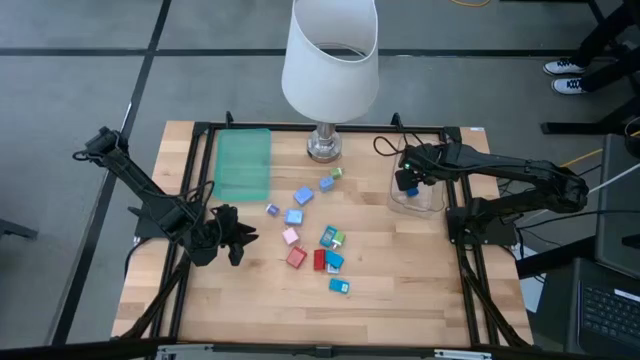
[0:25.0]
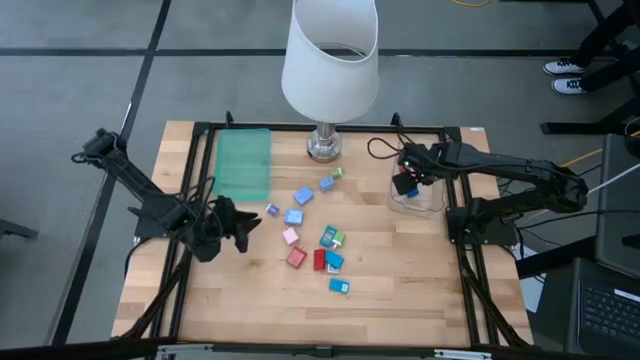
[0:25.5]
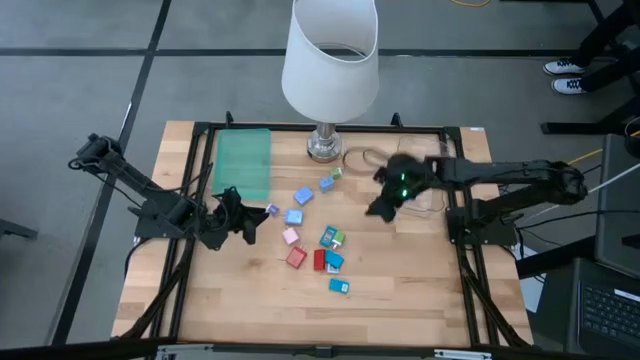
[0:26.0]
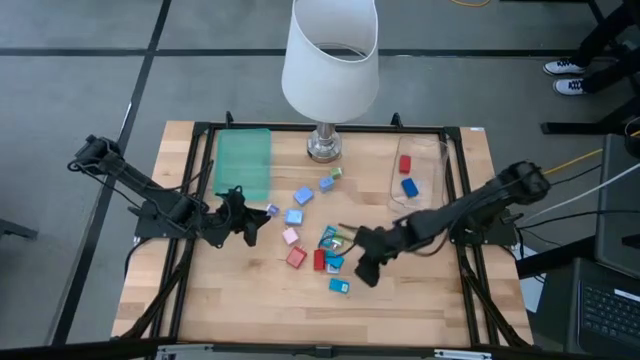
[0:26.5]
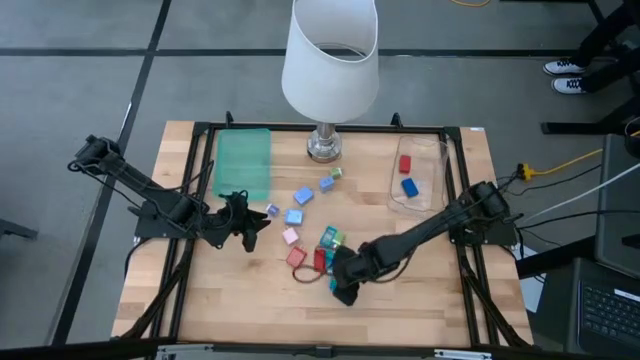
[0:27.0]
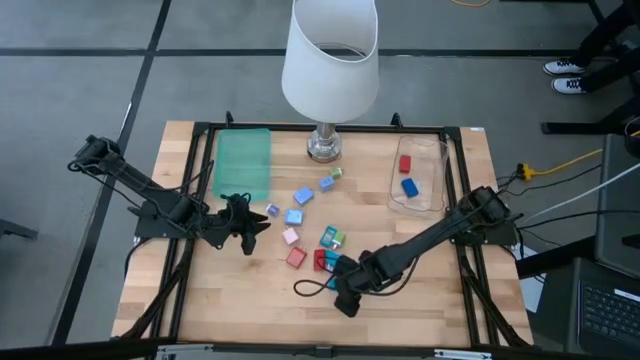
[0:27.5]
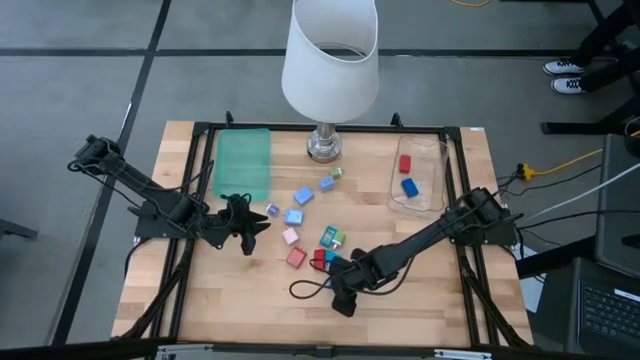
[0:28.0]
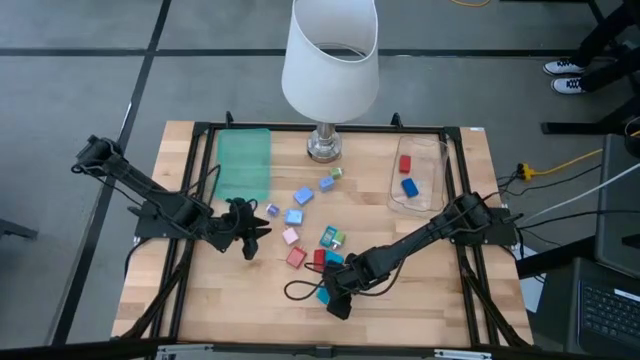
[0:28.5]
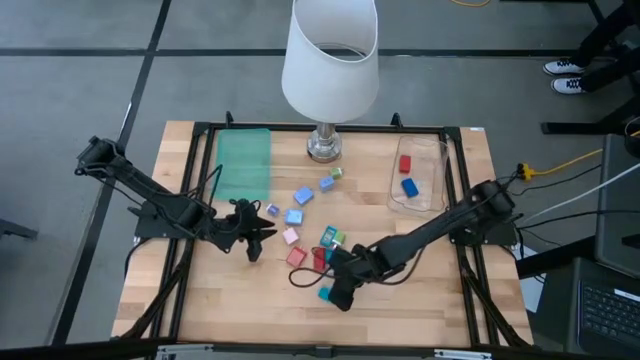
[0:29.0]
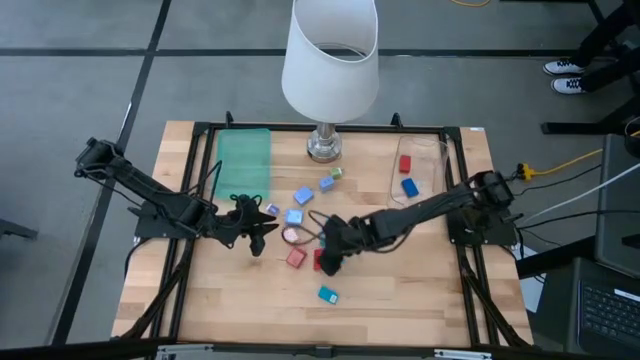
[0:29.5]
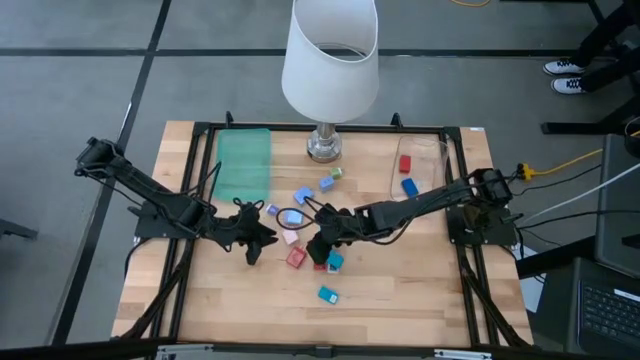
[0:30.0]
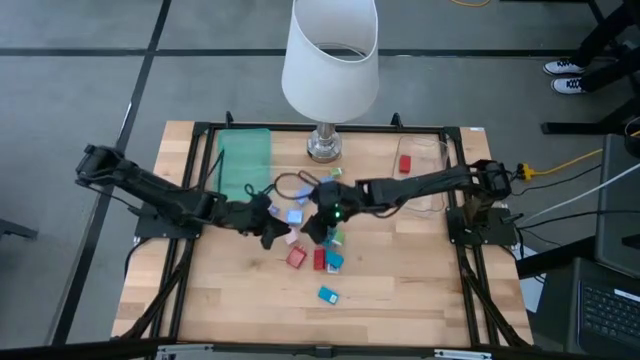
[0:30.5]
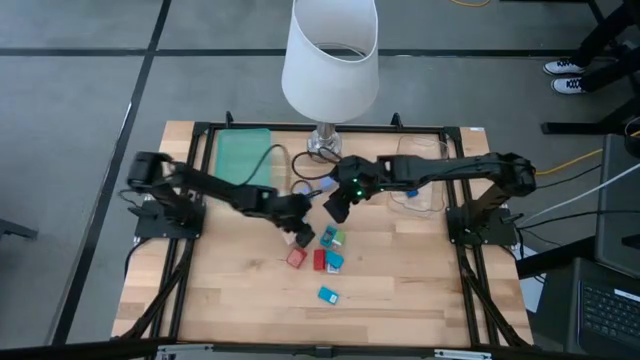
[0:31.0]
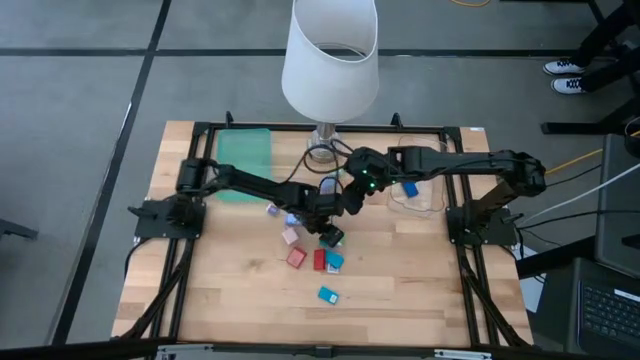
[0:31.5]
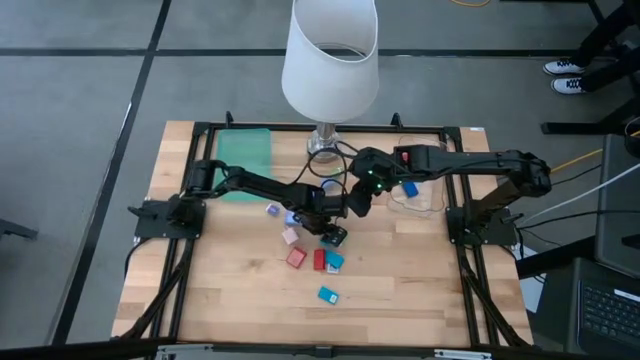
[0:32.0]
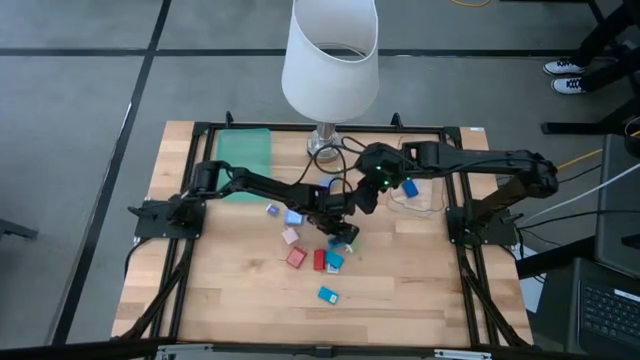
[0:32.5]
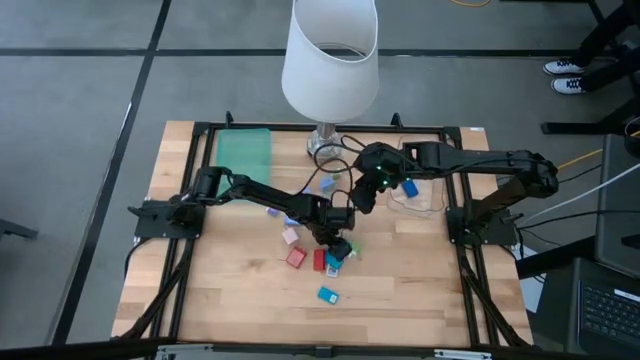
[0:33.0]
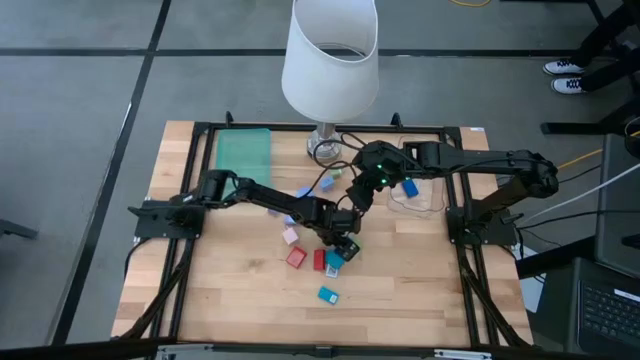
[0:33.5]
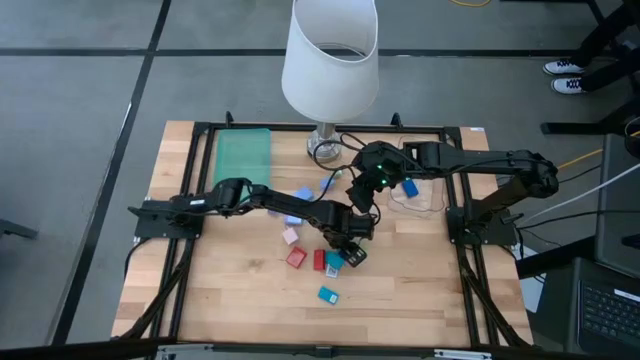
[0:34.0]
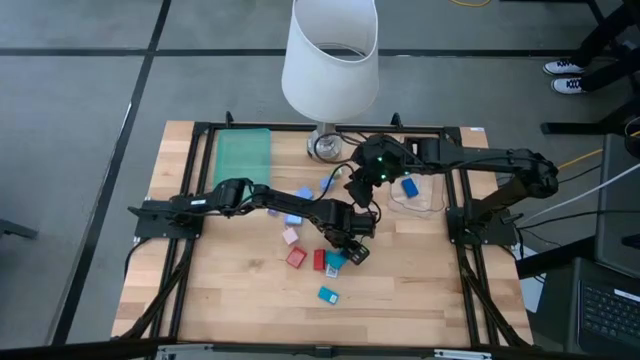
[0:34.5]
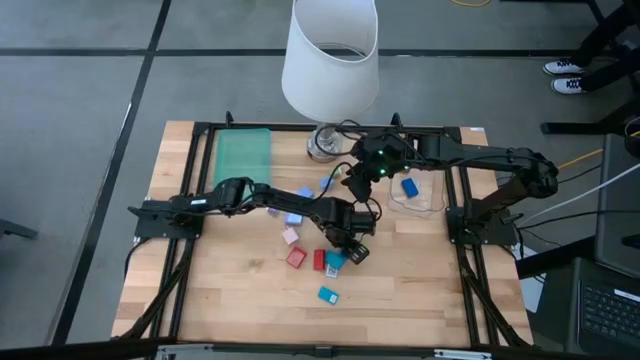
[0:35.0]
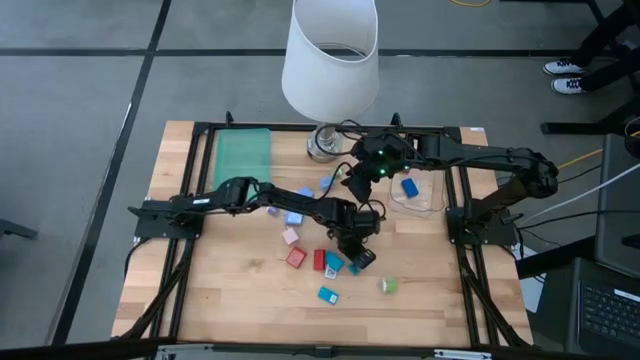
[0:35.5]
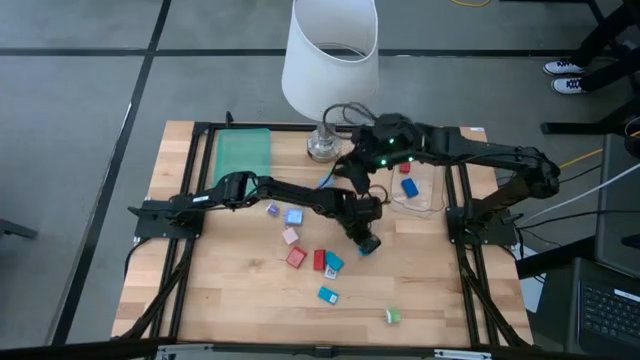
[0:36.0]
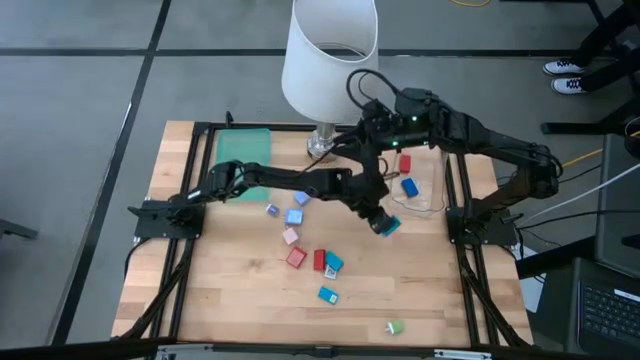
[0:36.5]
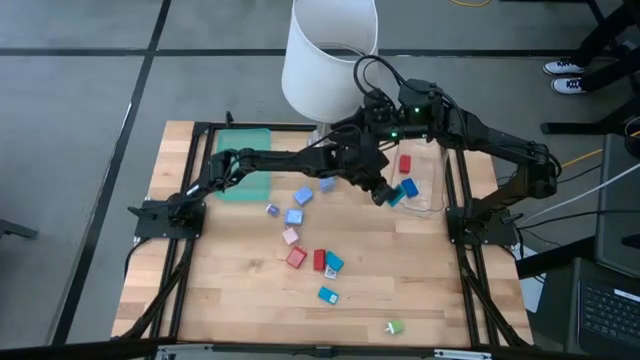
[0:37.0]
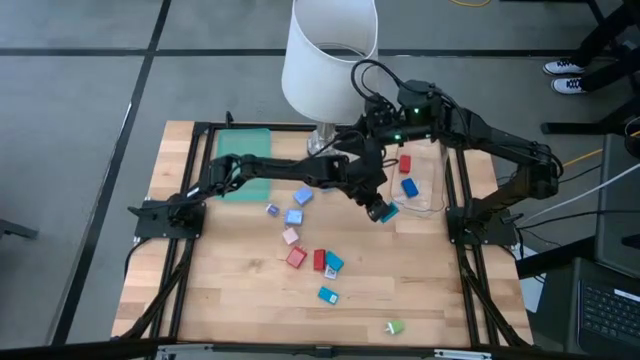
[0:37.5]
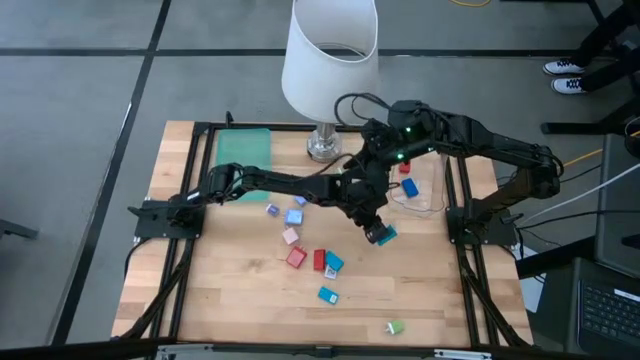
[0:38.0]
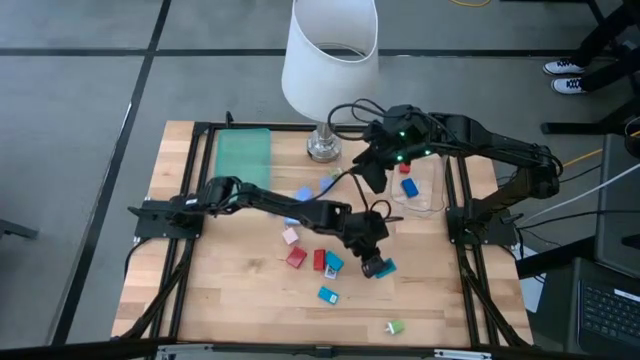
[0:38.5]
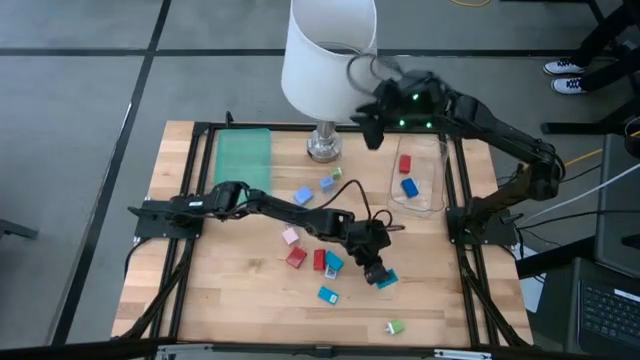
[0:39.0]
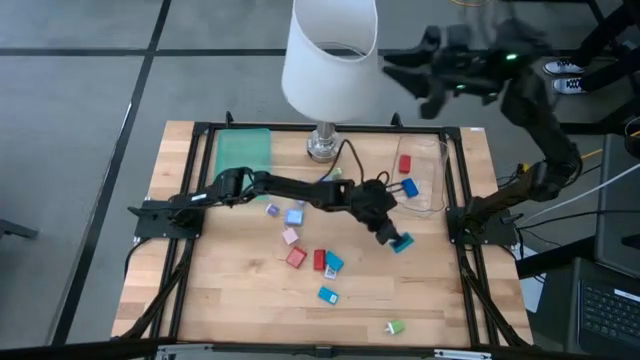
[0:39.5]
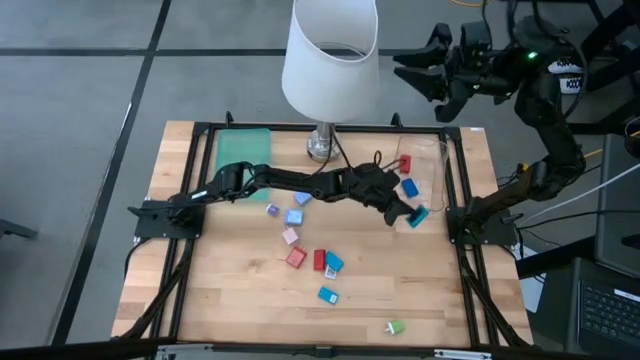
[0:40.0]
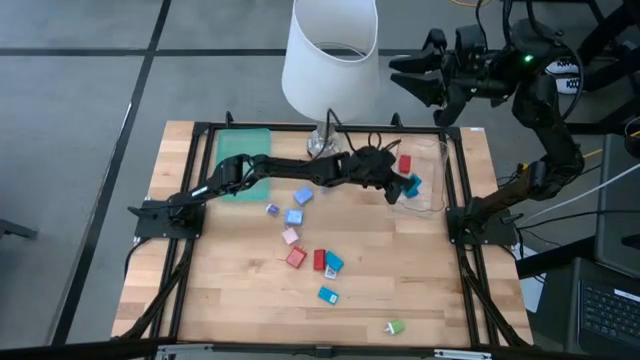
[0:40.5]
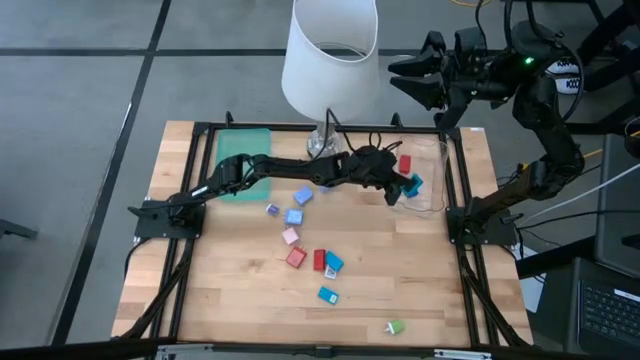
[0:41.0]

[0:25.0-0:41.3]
Task: Pick & Place Office items
Put the light blue digital timer into the transparent bin

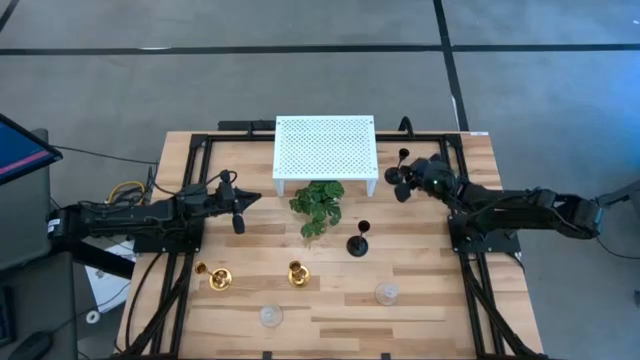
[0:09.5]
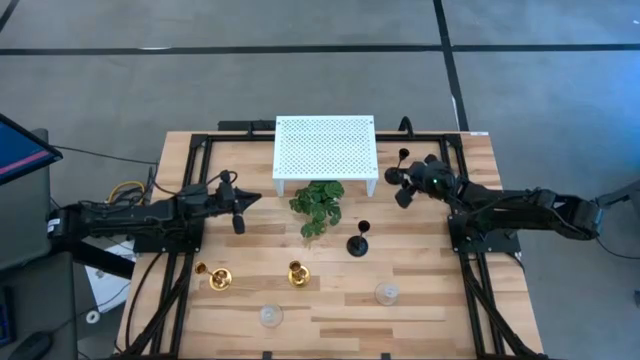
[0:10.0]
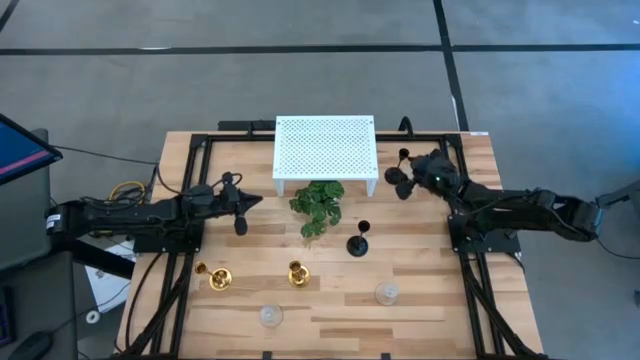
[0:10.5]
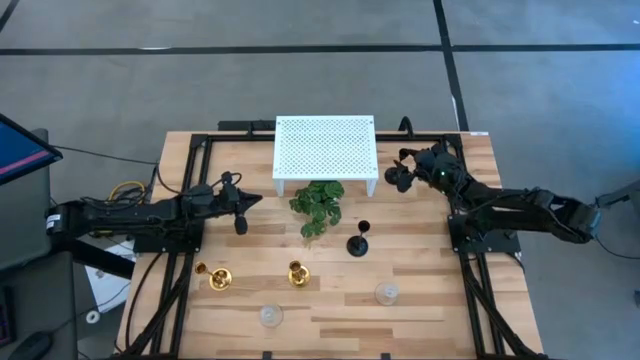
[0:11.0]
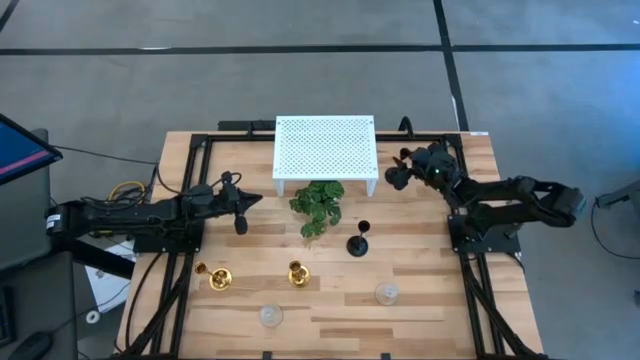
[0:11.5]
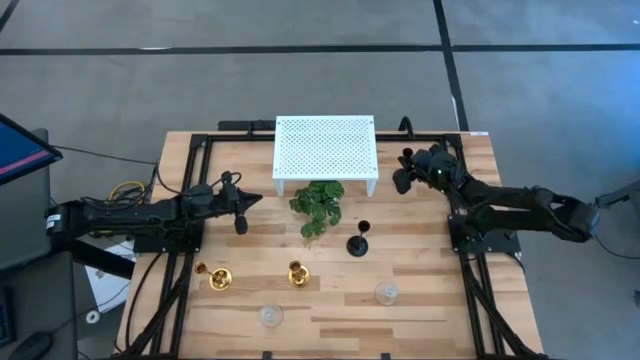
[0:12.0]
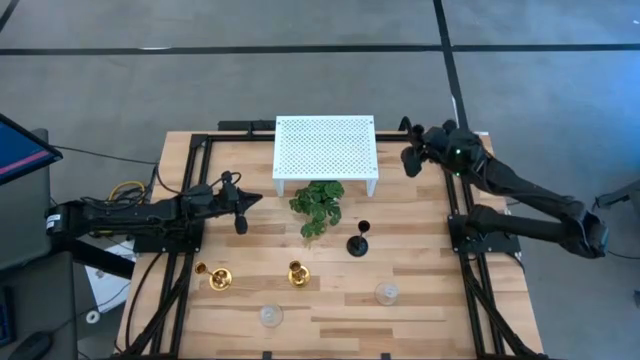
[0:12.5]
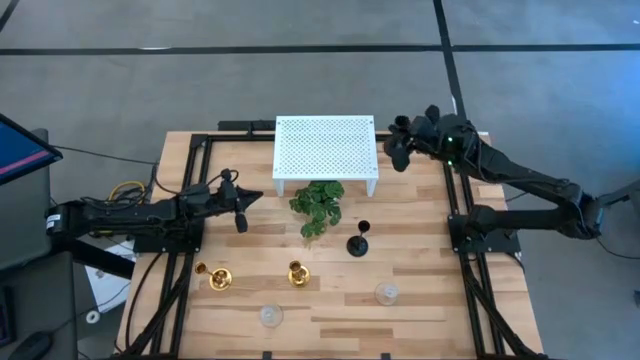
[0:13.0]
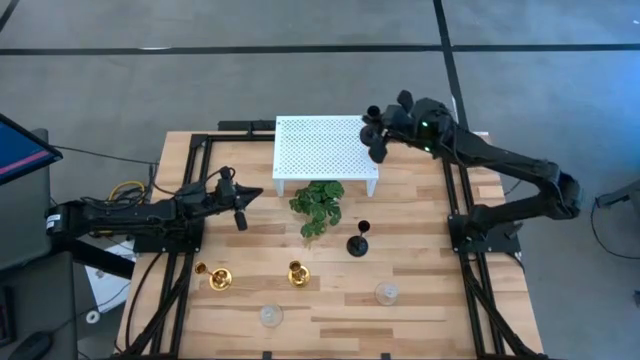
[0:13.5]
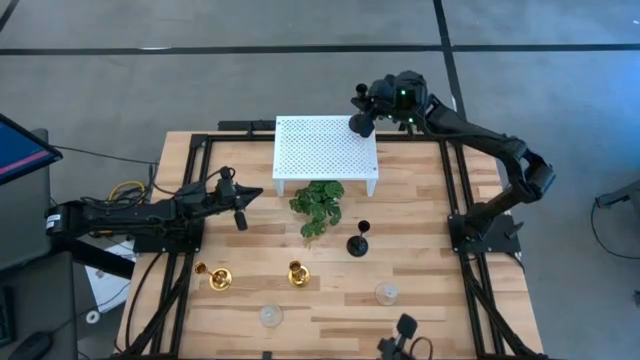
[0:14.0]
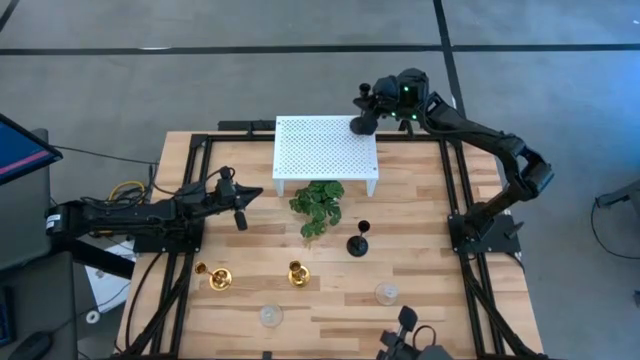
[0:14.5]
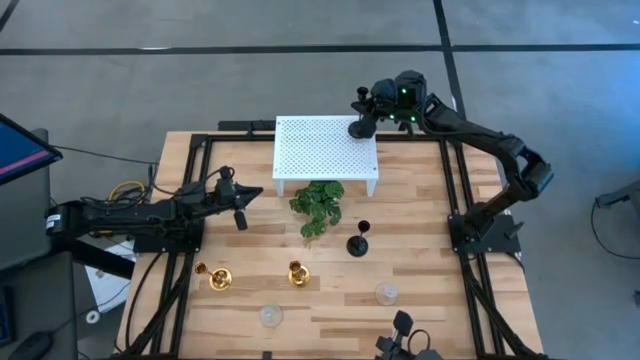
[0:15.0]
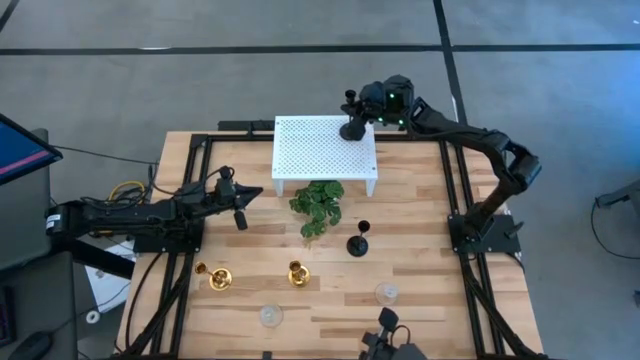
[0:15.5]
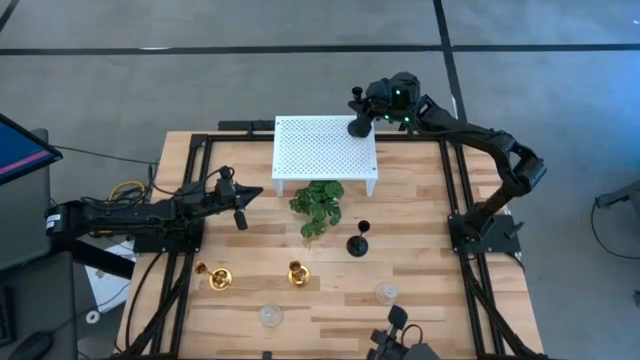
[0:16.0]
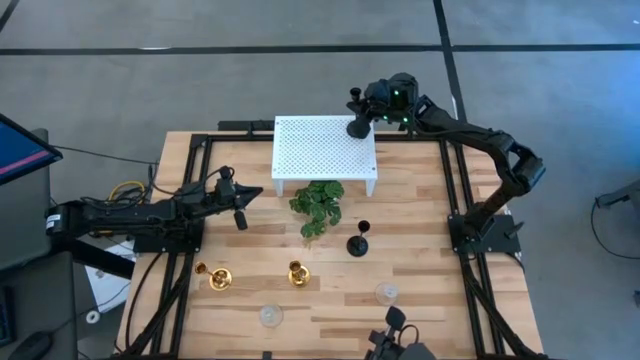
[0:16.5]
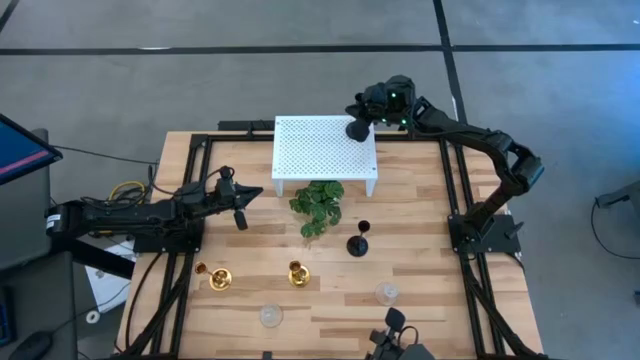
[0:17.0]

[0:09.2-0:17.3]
Task: Pick & Place candle stick holders
Put the top black candle holder on the shelf
